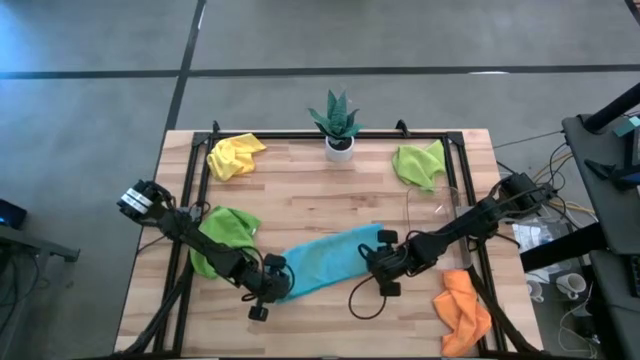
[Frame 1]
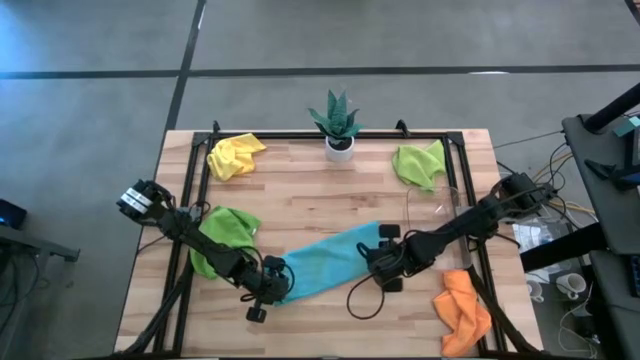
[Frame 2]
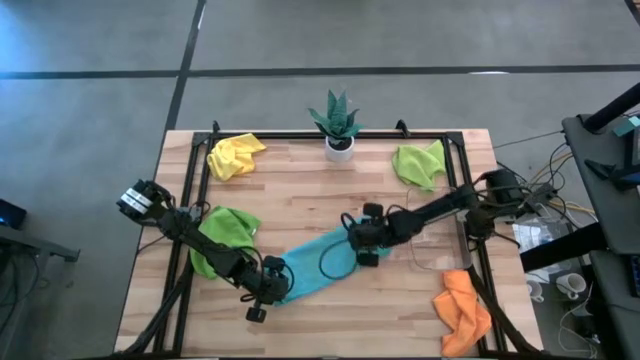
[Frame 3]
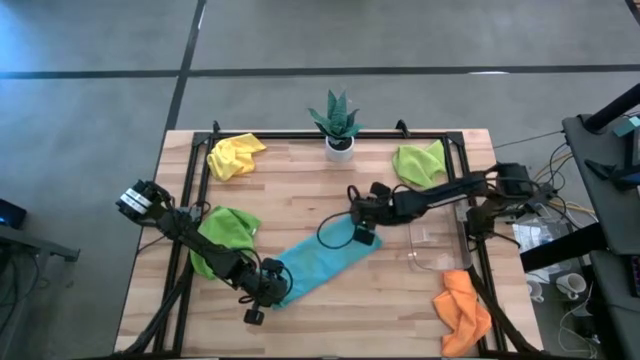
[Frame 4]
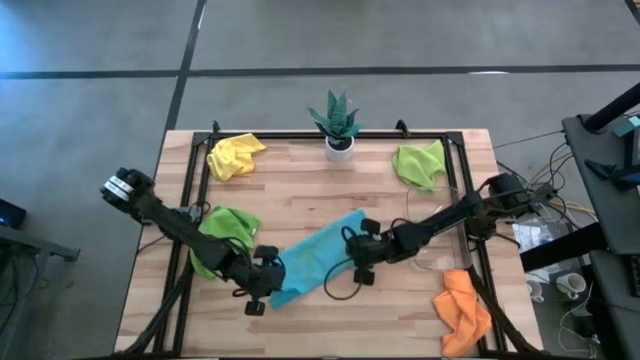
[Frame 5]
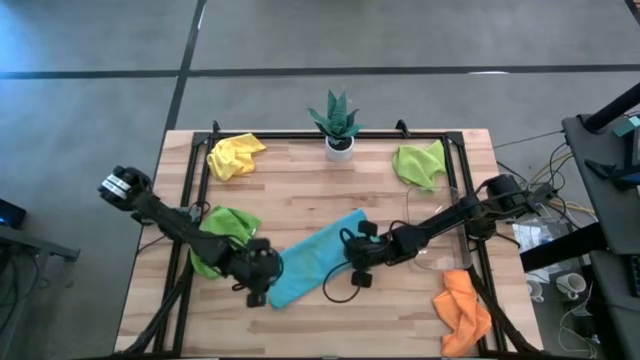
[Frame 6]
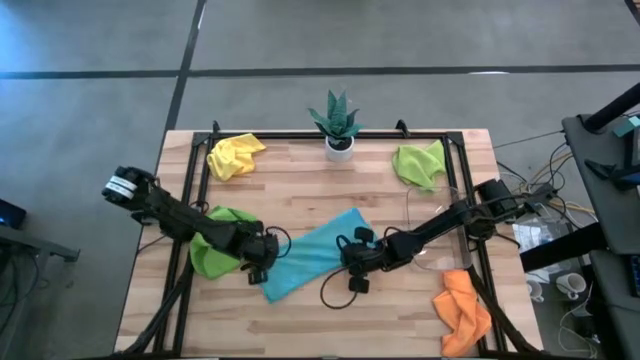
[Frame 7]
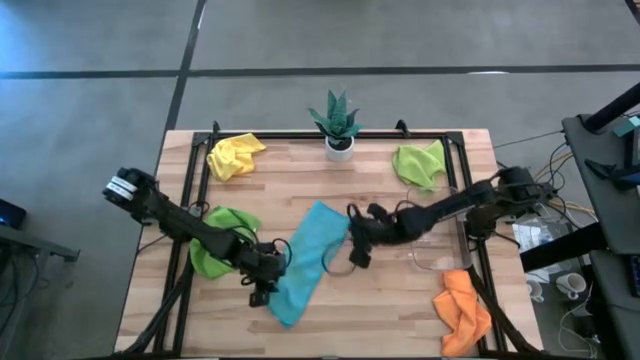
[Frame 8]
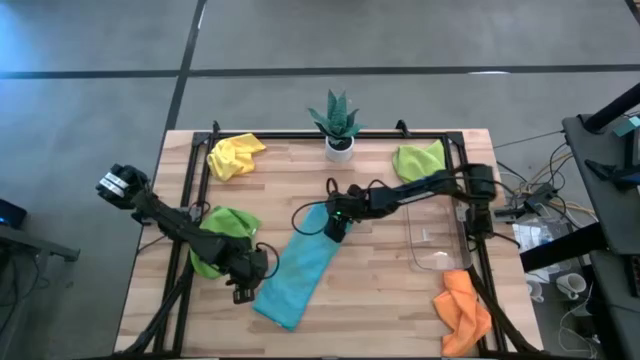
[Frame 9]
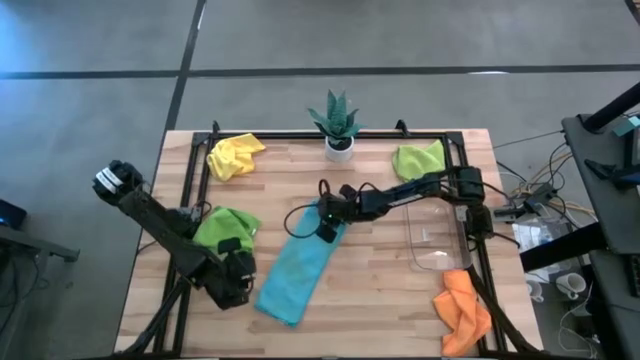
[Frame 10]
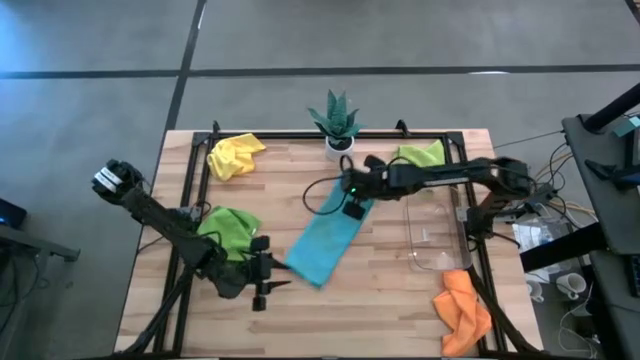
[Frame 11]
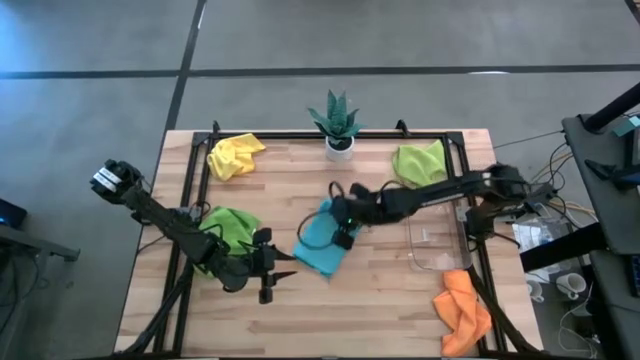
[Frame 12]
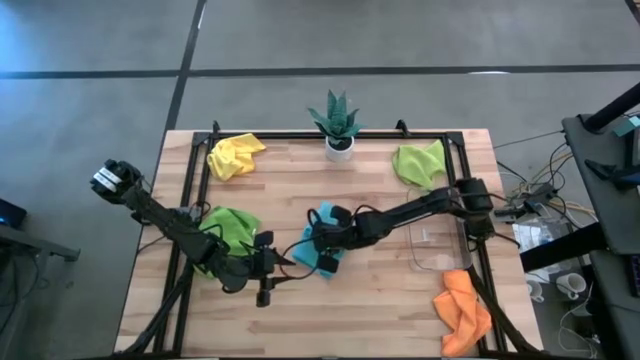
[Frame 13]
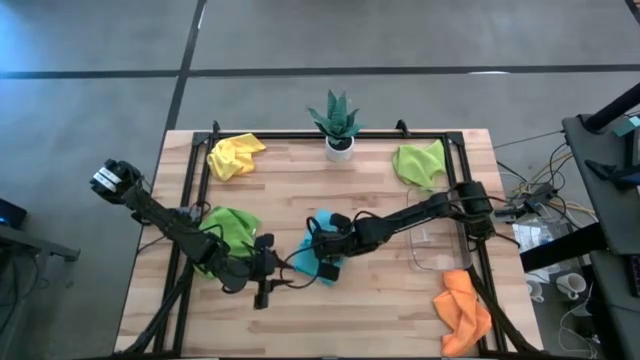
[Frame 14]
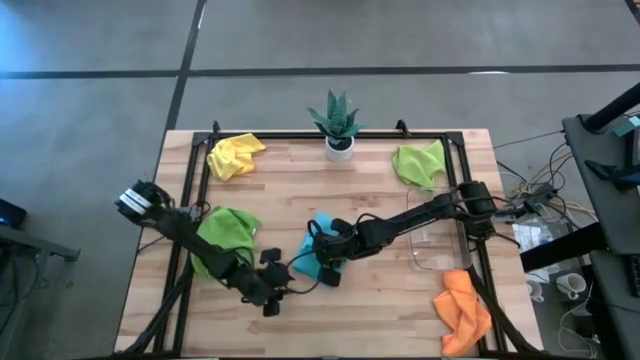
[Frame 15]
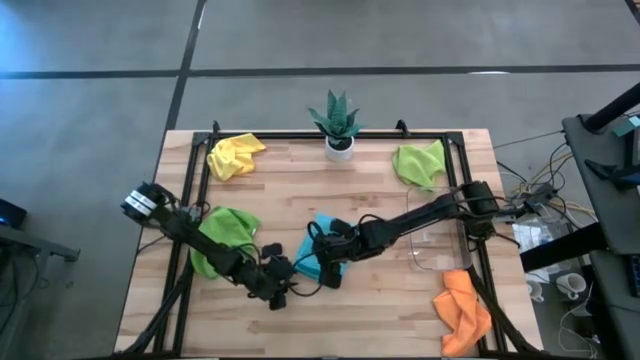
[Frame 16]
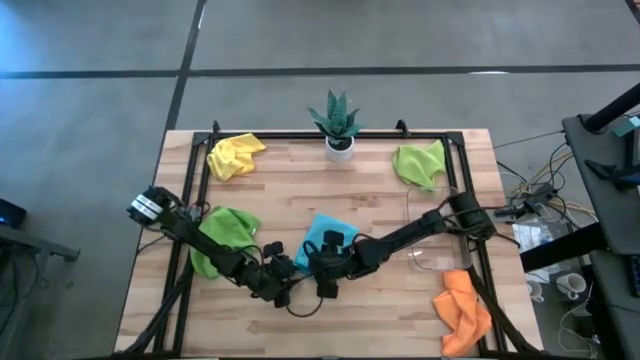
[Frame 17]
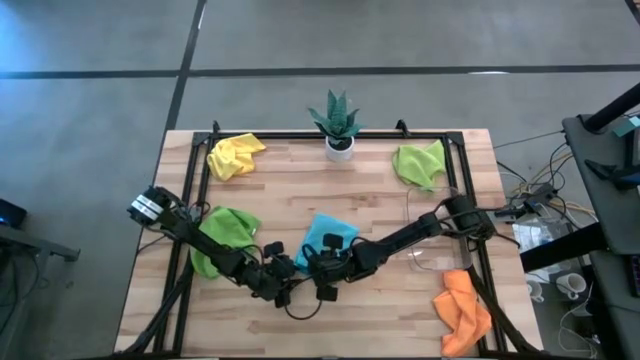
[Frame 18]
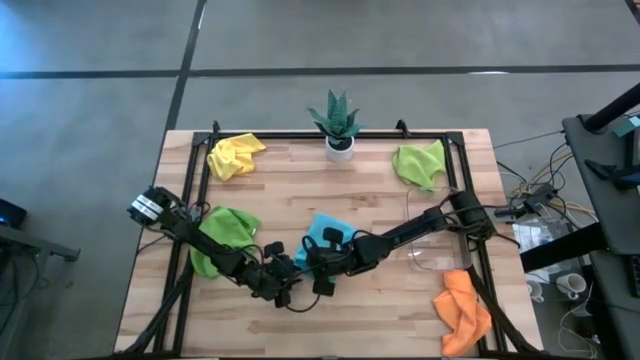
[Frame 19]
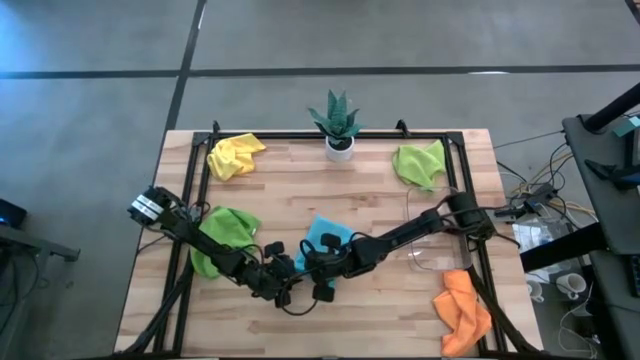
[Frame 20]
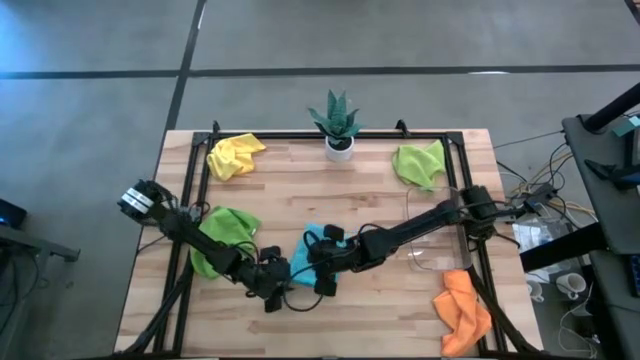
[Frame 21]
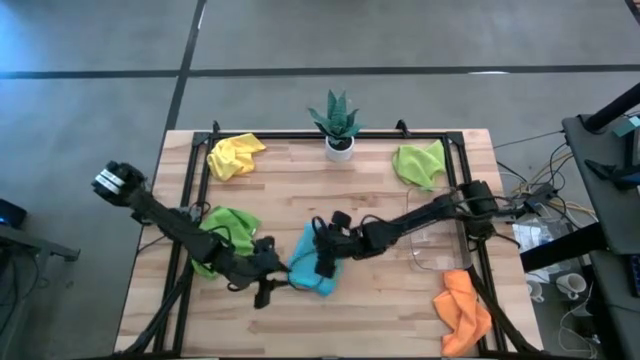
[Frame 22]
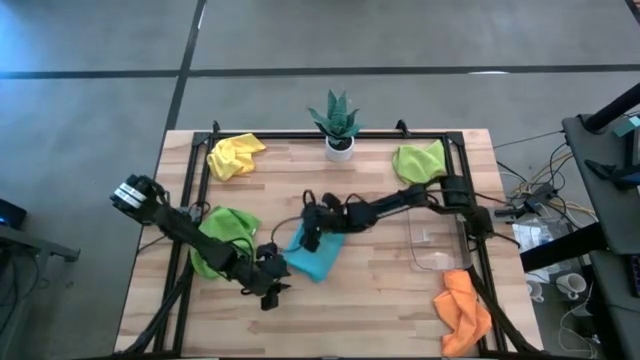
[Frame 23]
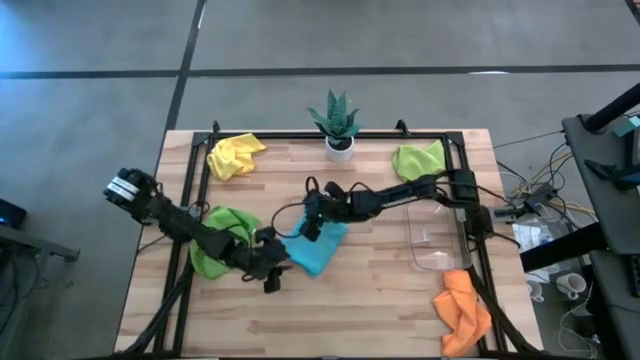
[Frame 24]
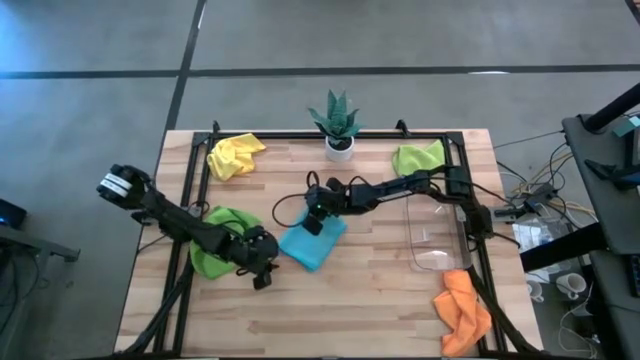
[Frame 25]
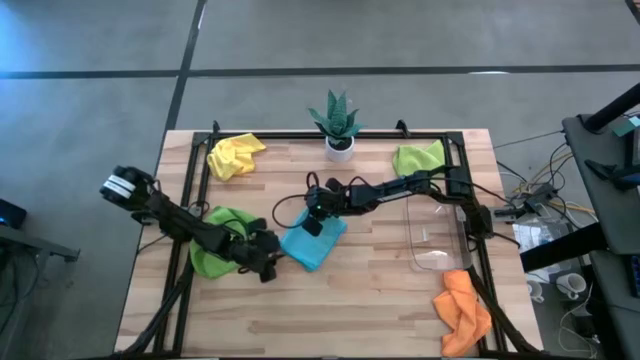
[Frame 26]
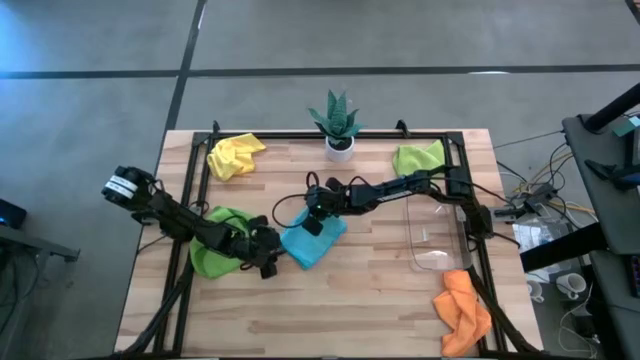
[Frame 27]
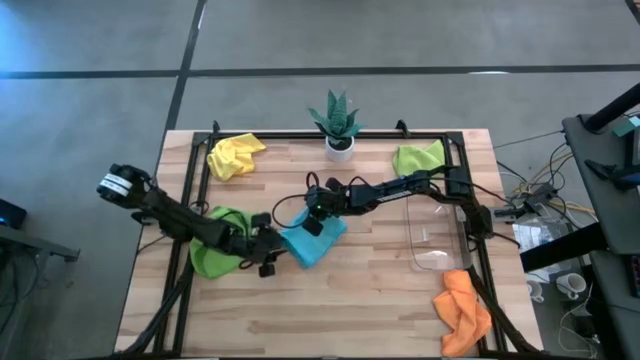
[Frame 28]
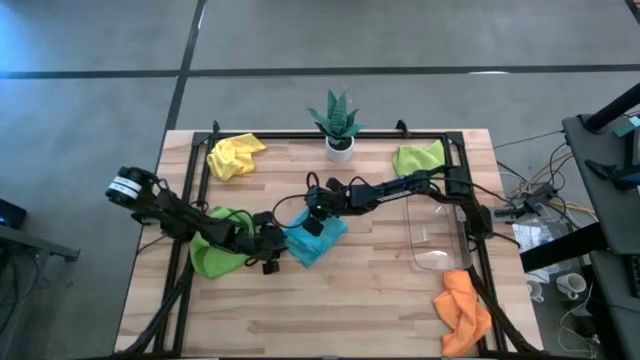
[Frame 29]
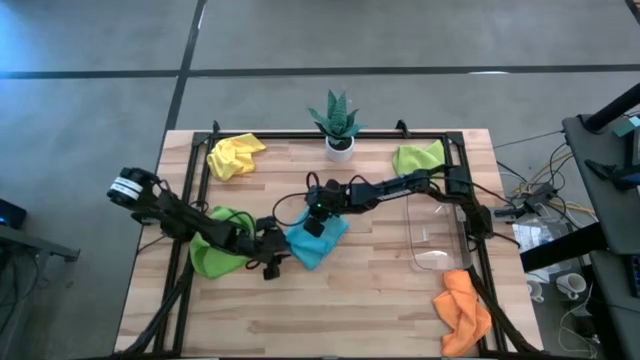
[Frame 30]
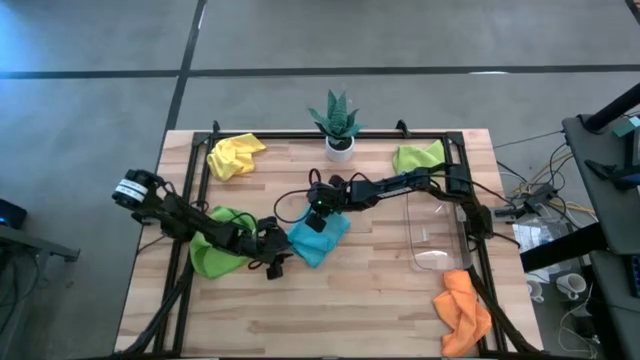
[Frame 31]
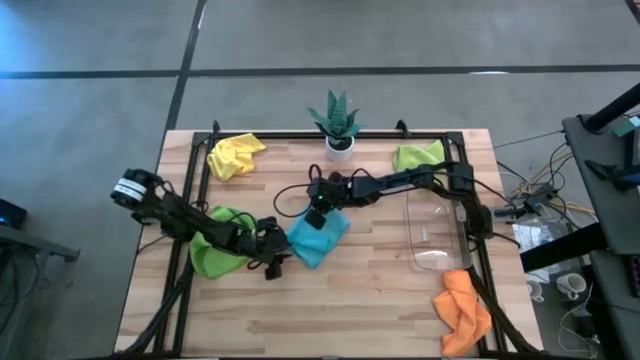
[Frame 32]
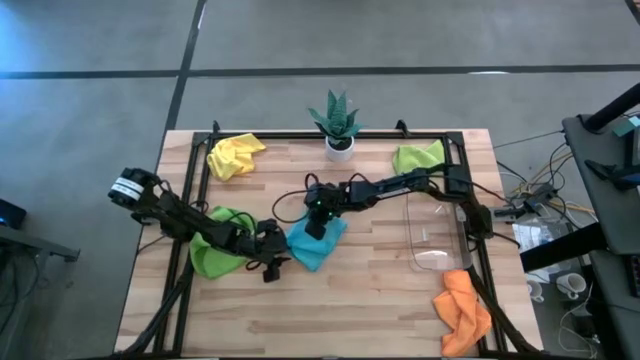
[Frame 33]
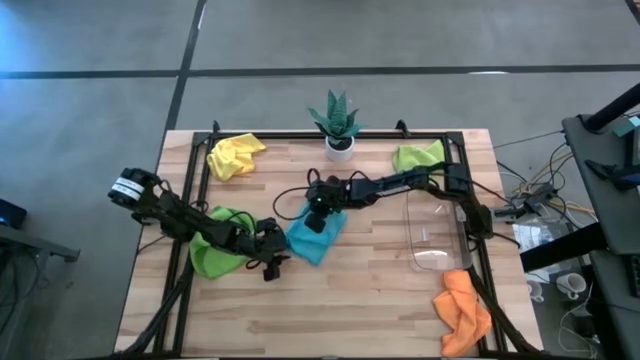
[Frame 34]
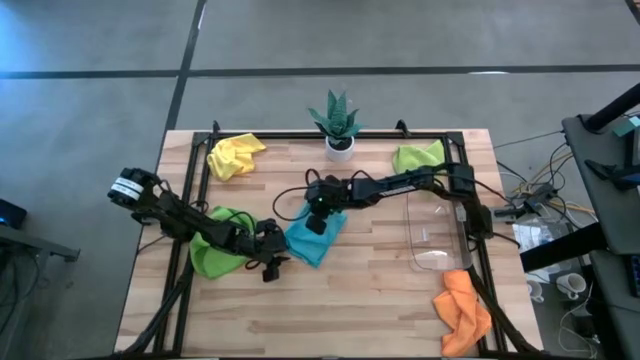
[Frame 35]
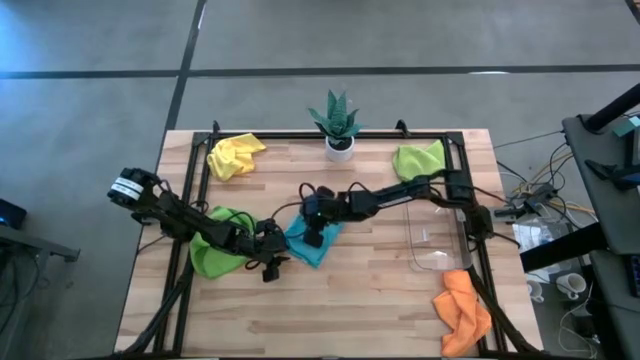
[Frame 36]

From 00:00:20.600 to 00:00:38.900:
Task: Fold microfiber towels
Fold the blue towel on the table

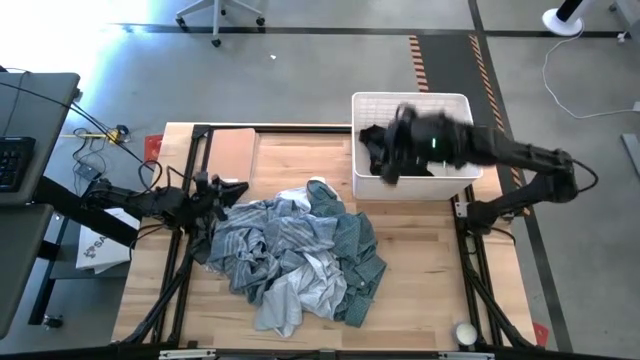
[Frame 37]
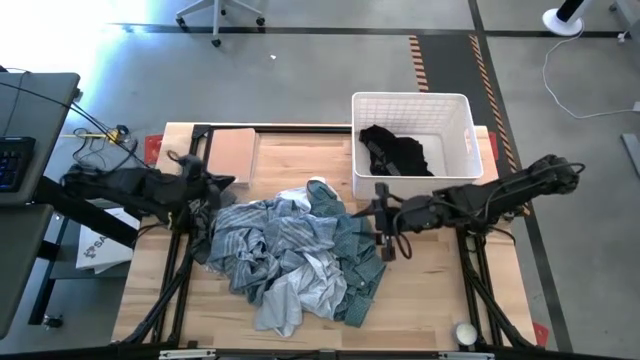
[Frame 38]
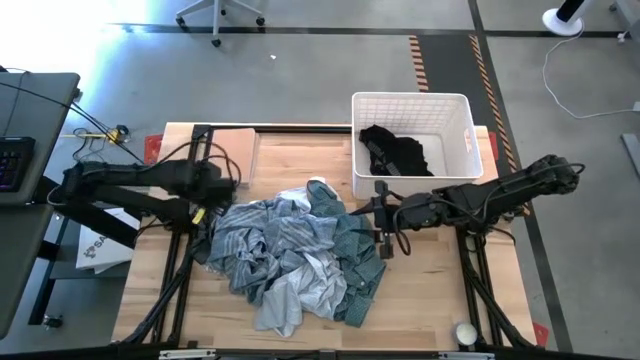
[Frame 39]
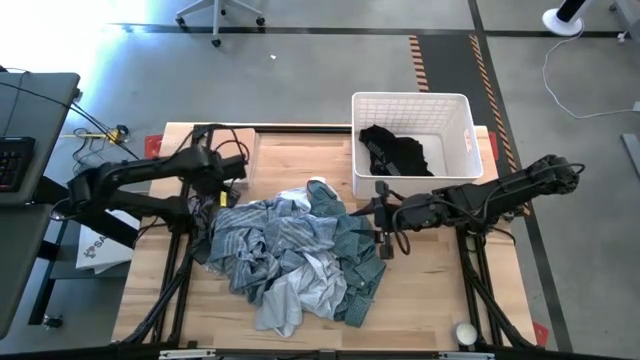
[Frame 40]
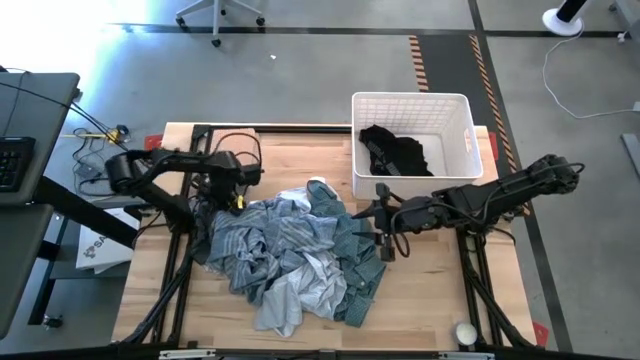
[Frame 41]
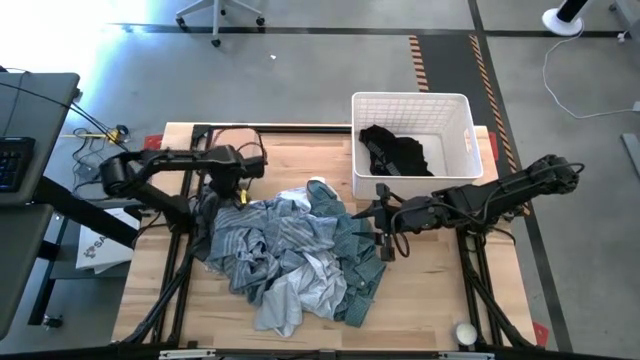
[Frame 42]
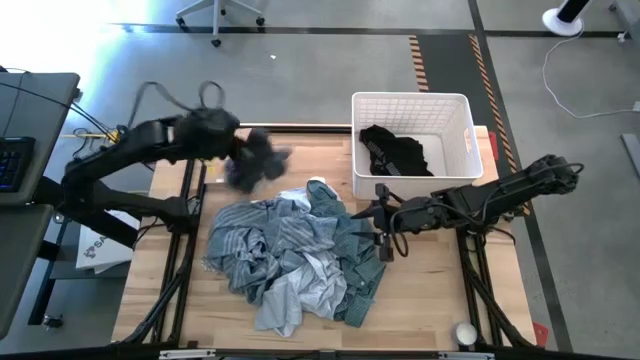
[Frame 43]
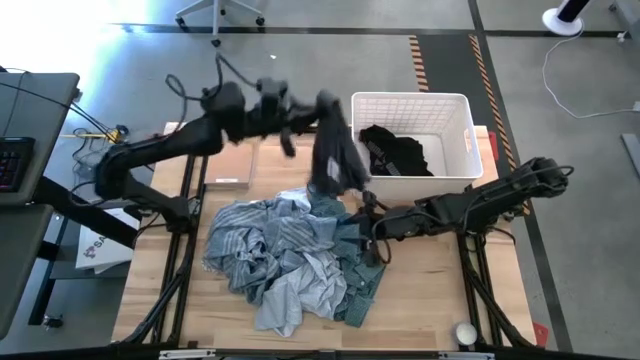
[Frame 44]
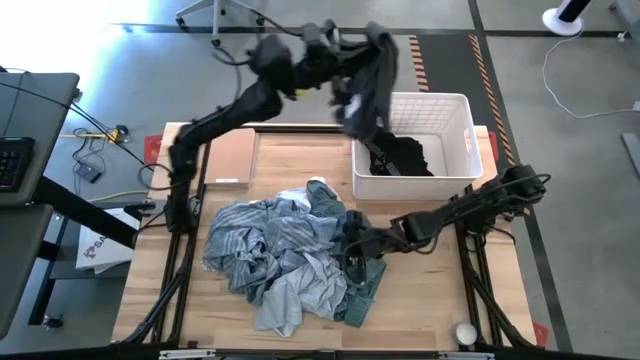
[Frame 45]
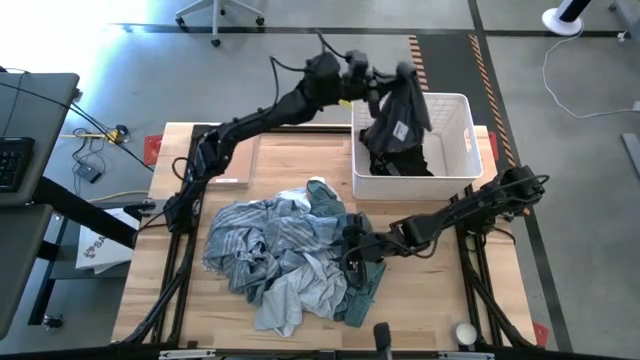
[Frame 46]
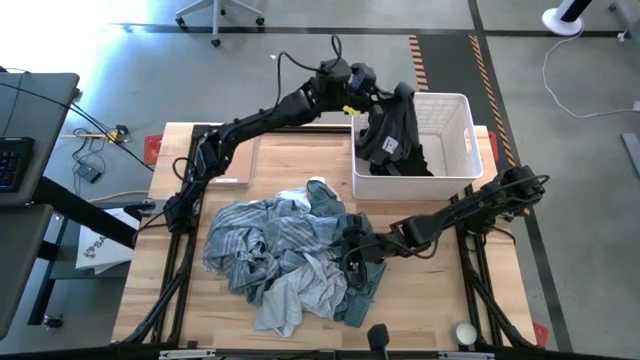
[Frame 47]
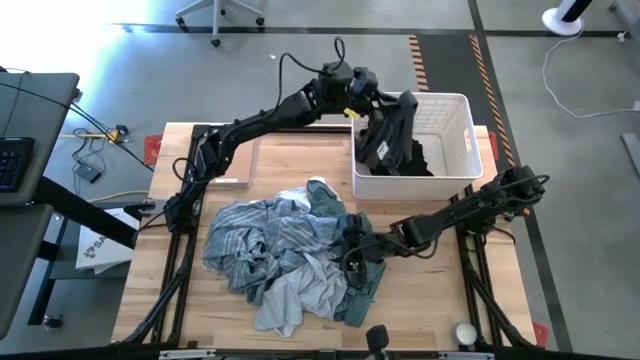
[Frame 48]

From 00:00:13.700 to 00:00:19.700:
Task: Sort clothes
Put the gray short into the white laundry bin
